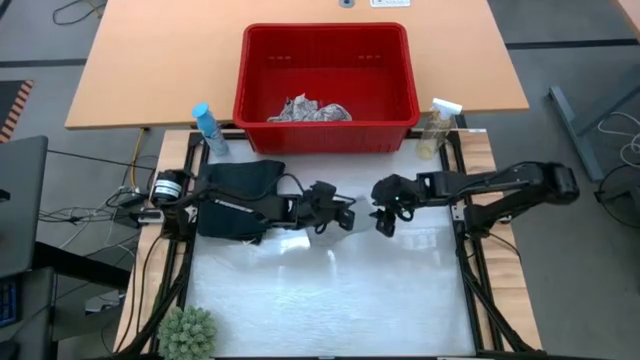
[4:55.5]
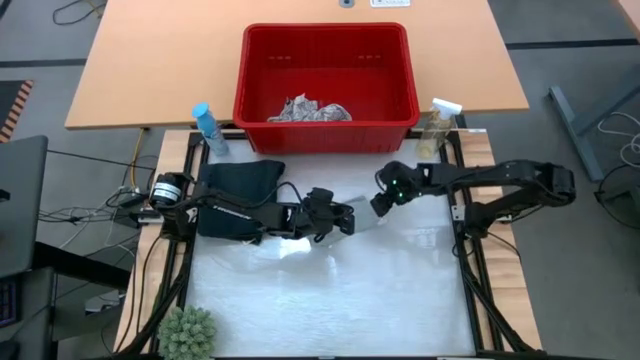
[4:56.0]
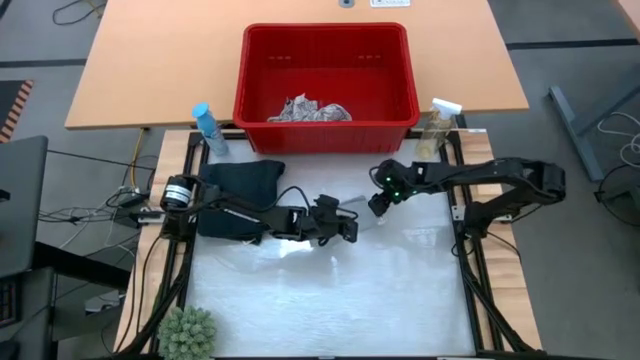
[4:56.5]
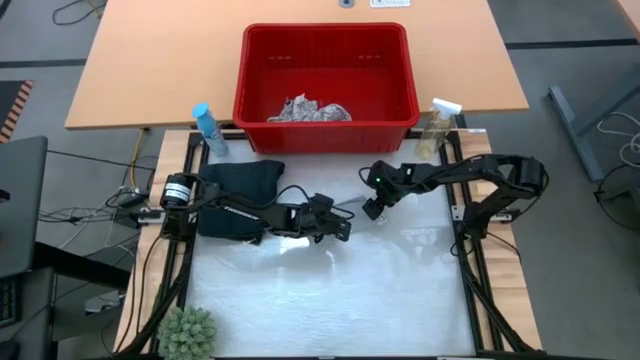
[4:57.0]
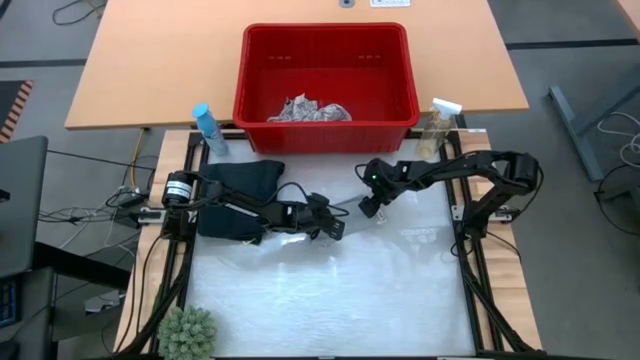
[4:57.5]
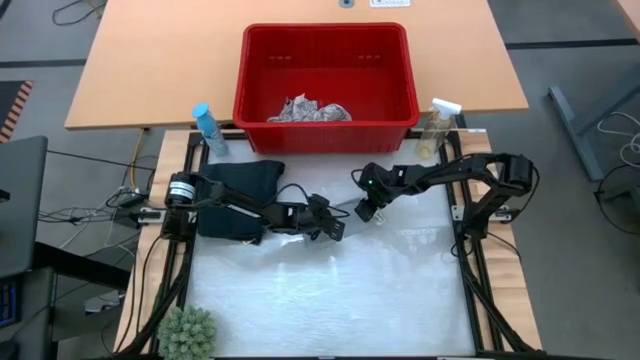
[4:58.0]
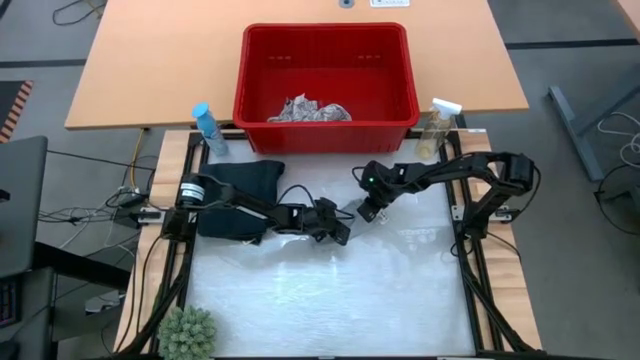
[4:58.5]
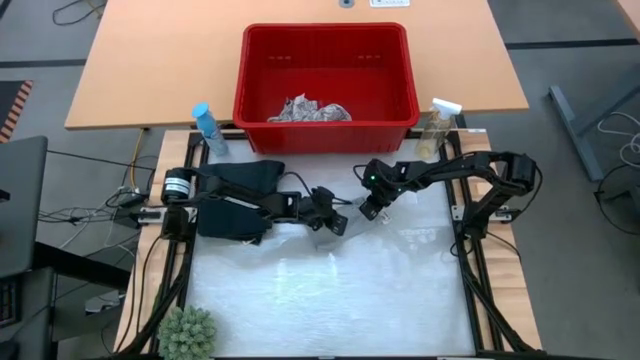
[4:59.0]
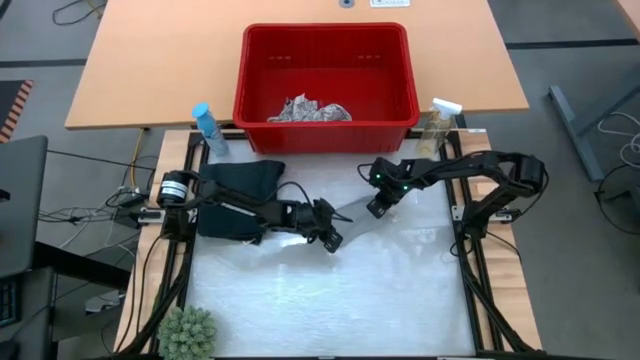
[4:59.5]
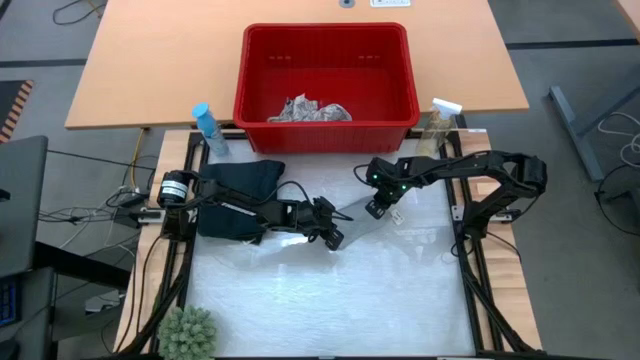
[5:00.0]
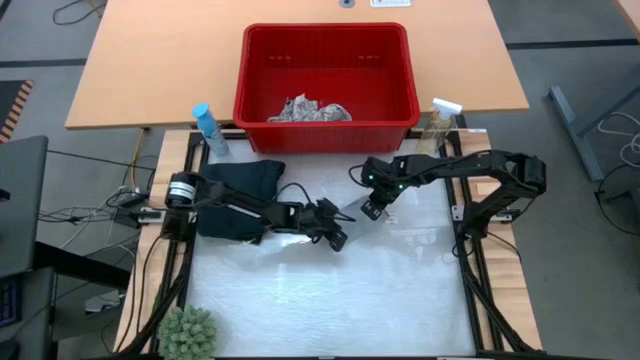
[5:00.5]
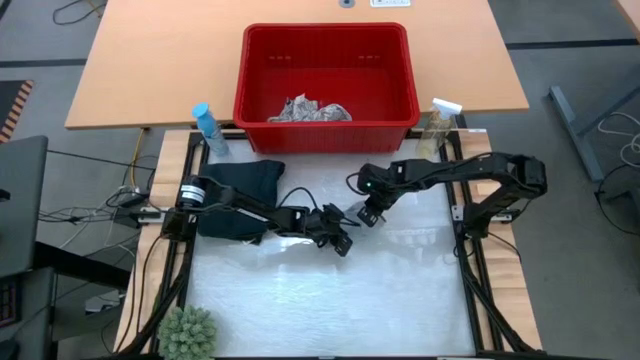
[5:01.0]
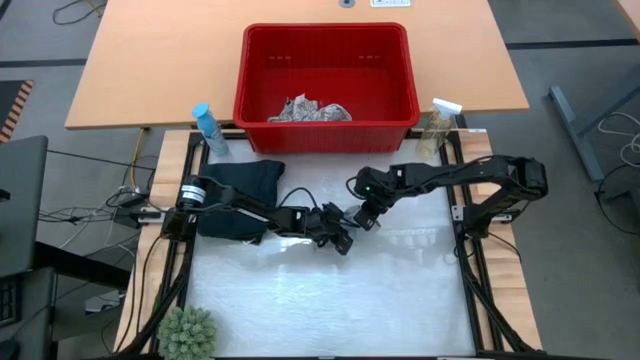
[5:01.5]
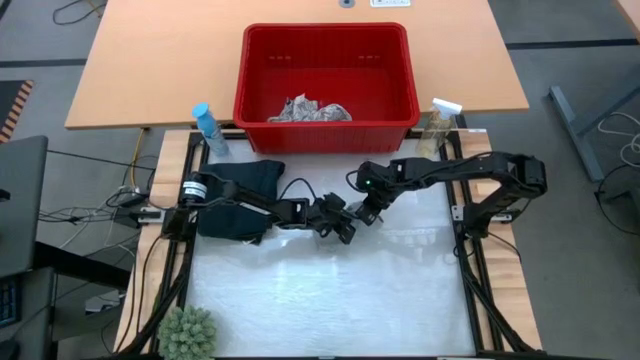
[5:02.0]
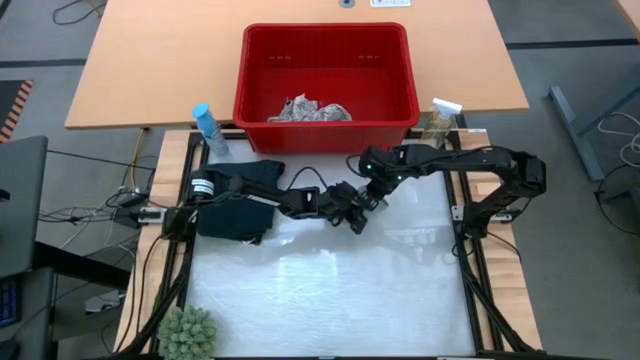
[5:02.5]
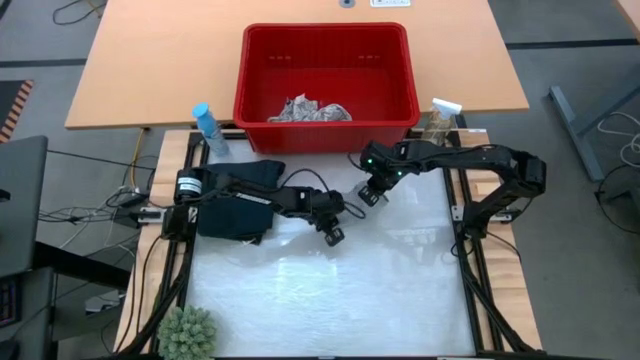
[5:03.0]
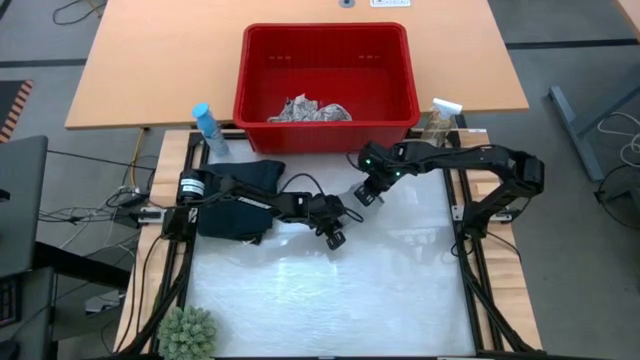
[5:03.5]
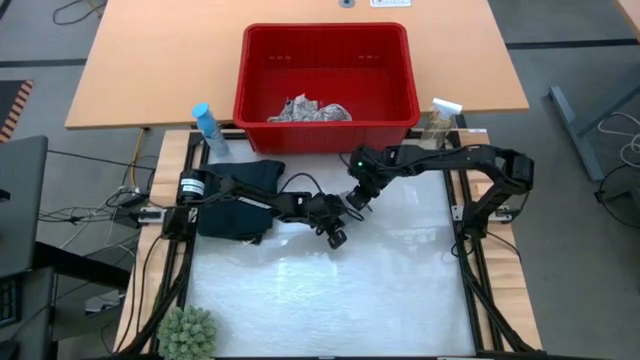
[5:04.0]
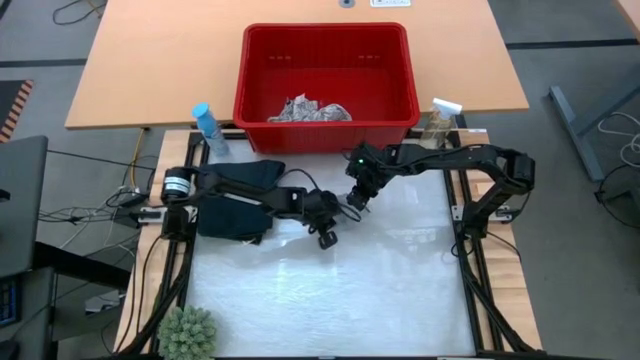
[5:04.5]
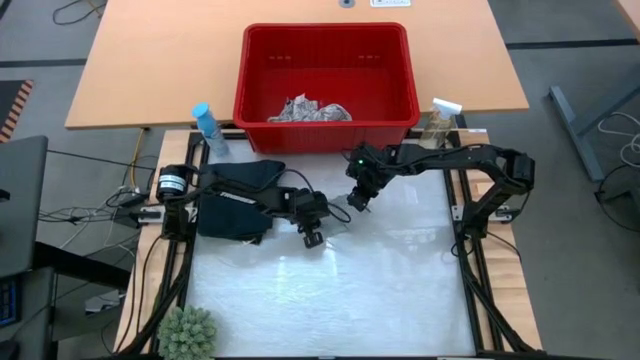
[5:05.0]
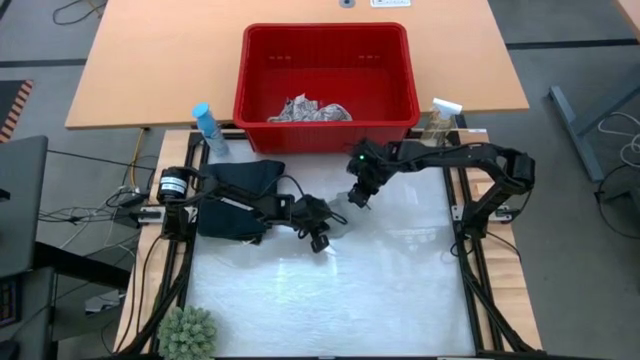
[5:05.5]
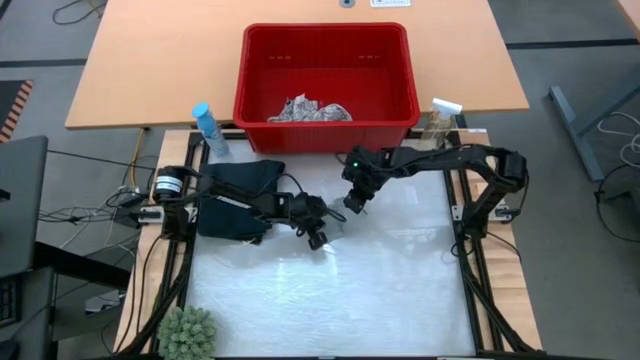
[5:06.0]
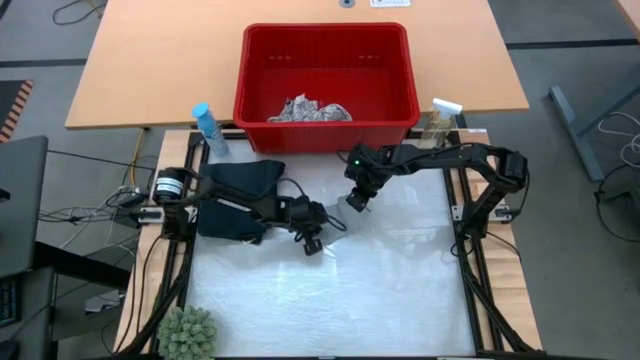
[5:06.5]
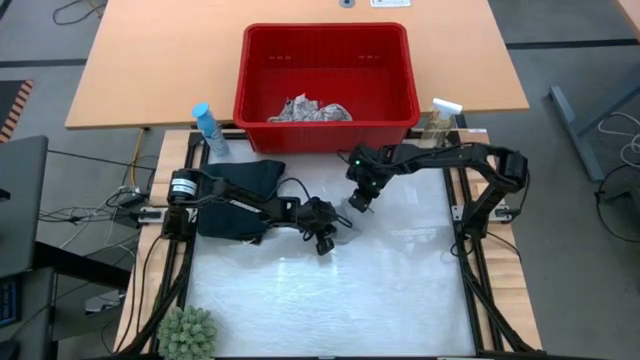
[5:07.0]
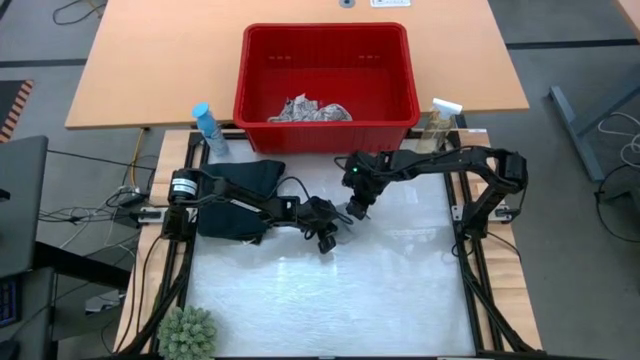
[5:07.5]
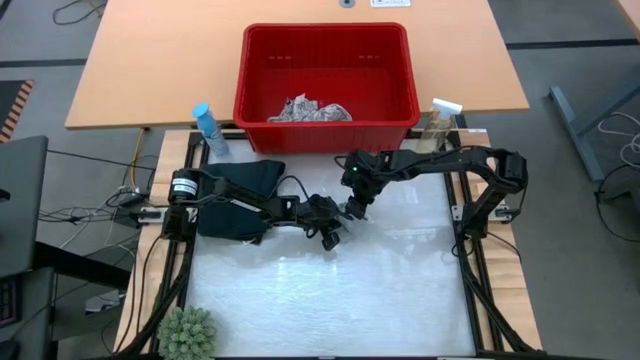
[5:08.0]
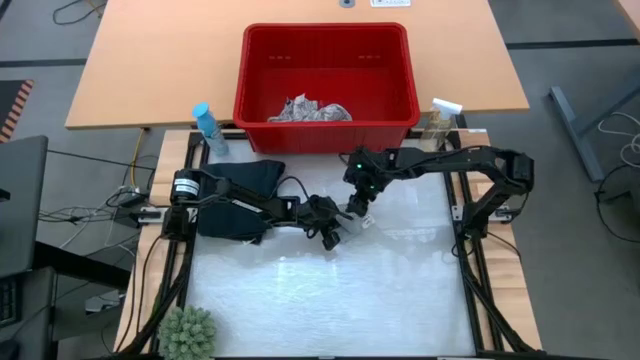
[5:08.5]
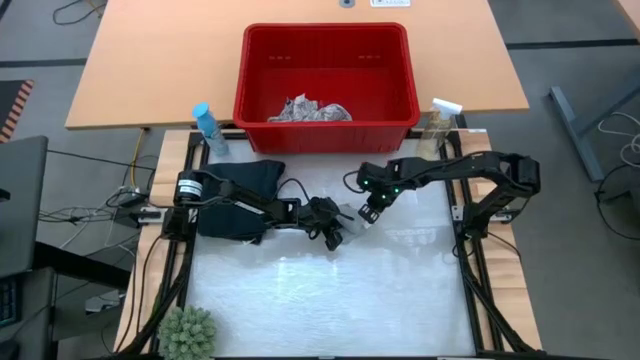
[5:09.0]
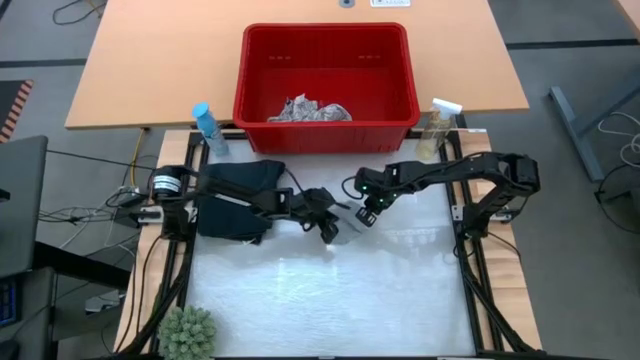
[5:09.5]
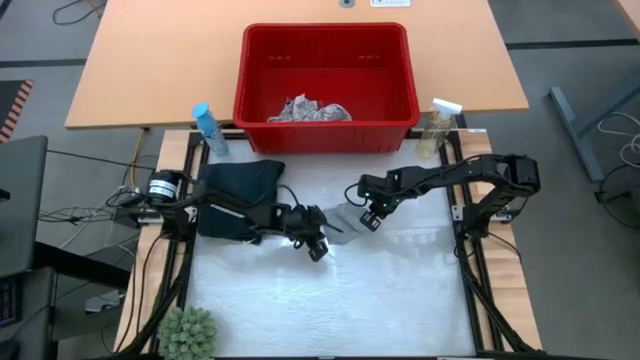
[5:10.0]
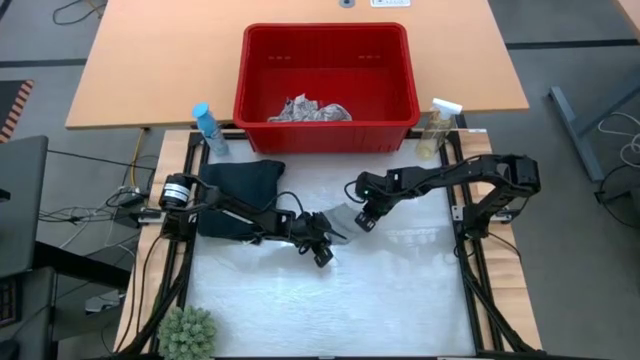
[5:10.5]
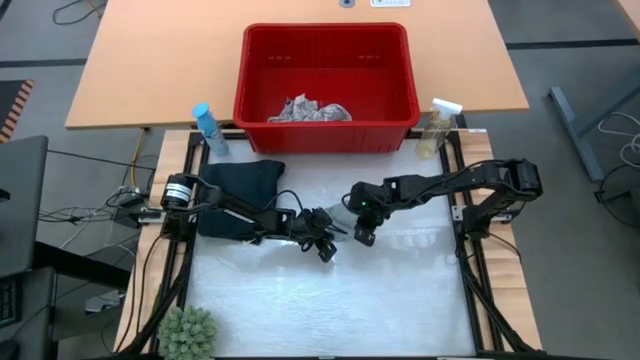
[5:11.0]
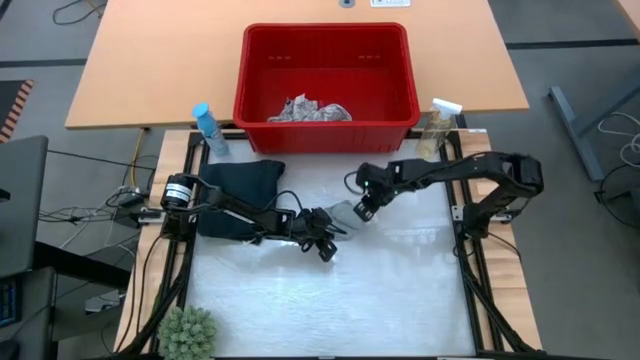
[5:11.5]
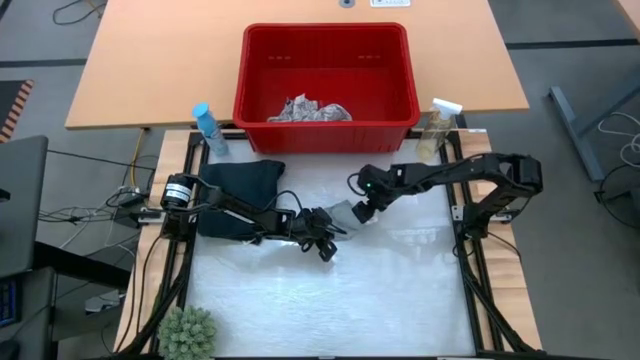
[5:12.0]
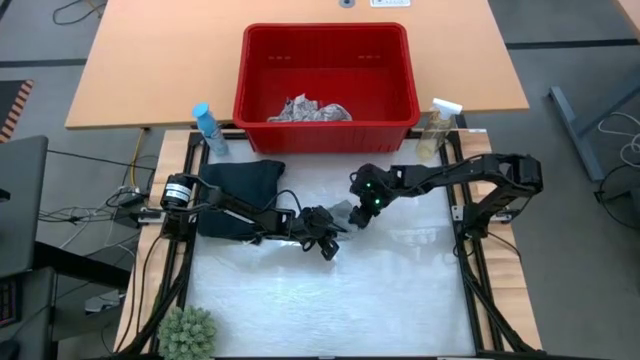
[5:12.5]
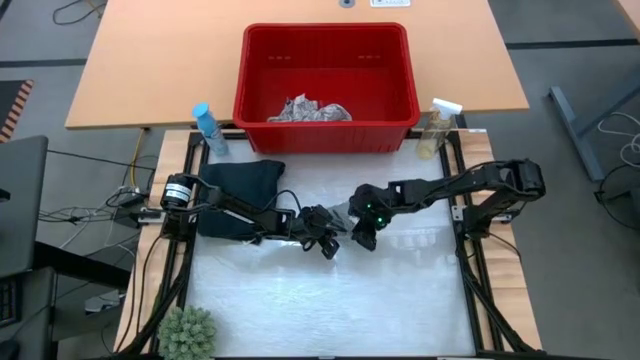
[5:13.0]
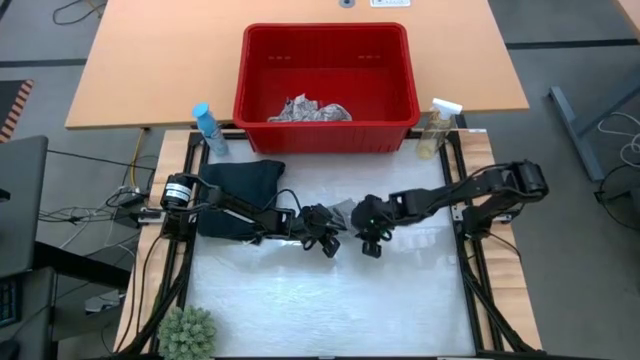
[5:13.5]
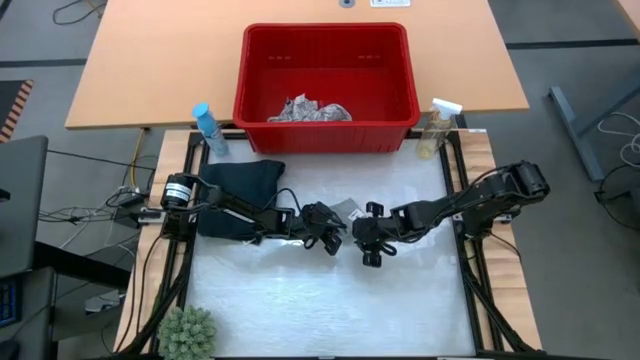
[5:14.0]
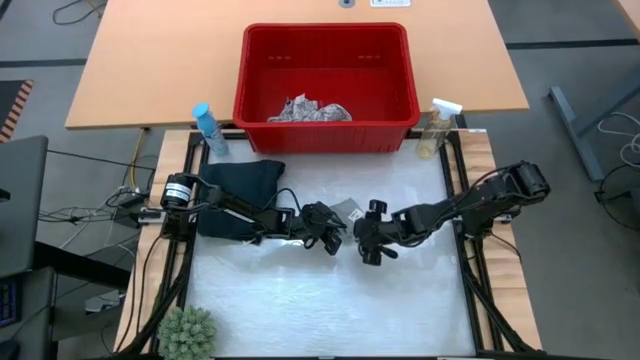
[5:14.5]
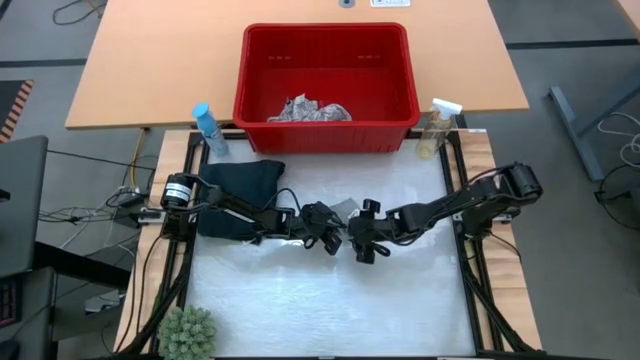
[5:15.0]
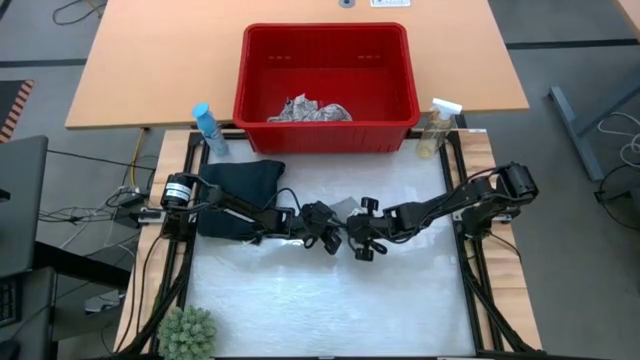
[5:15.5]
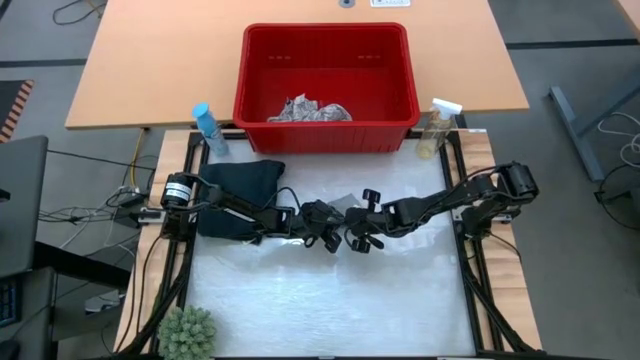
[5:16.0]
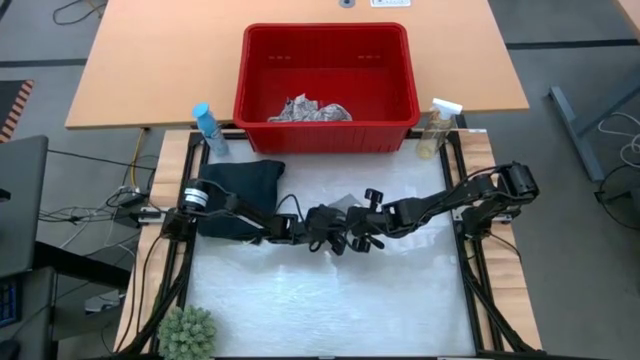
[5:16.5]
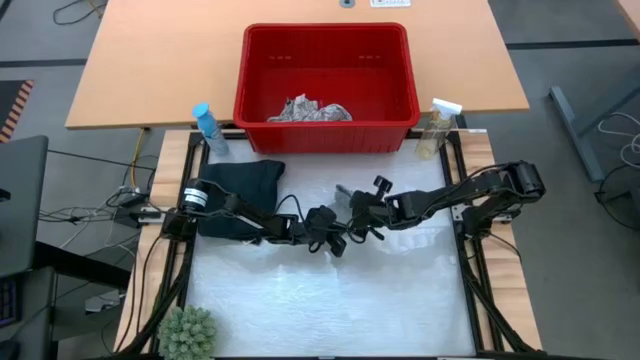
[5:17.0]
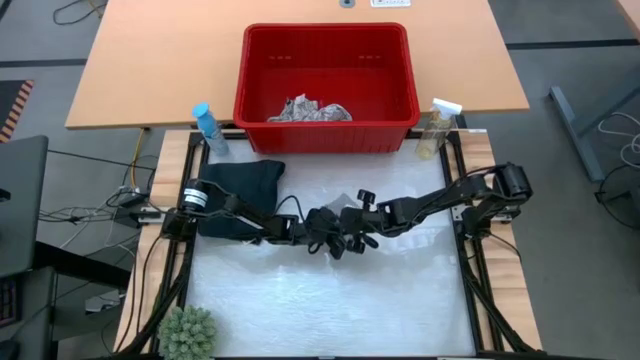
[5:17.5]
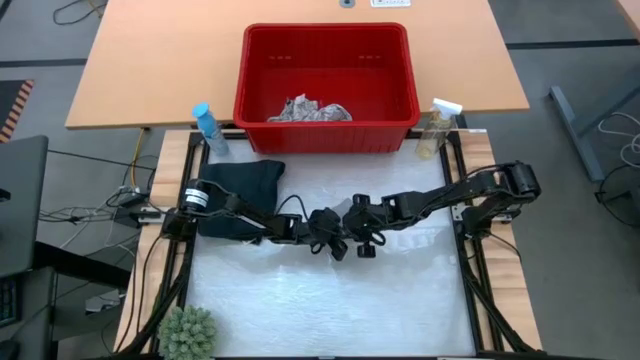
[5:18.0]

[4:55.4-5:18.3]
Task: Fold Laundry from Bin
Fold the gray shorts
